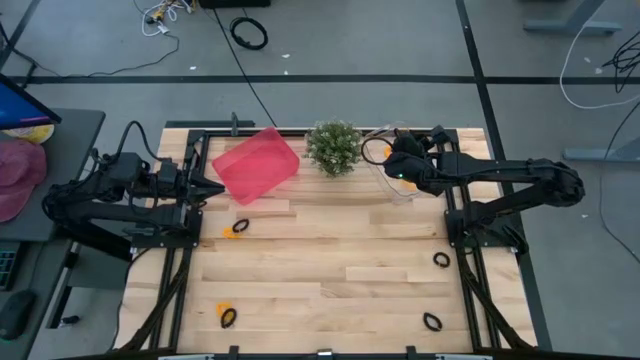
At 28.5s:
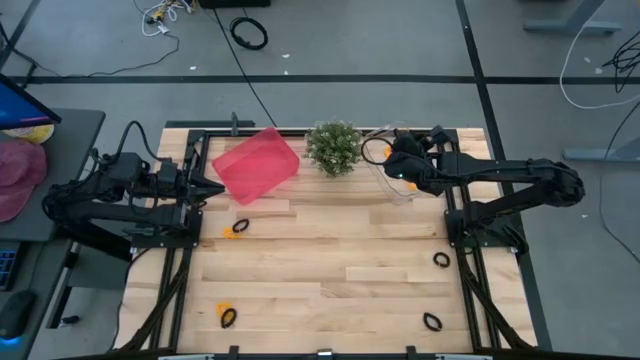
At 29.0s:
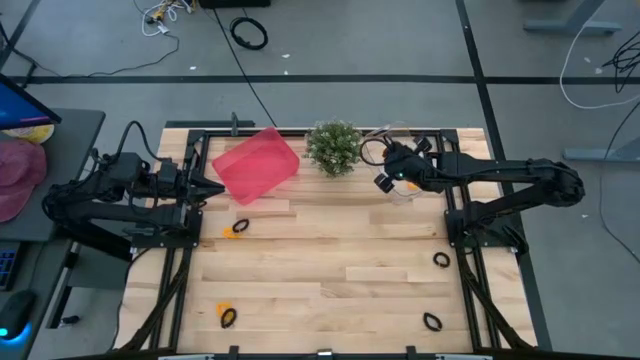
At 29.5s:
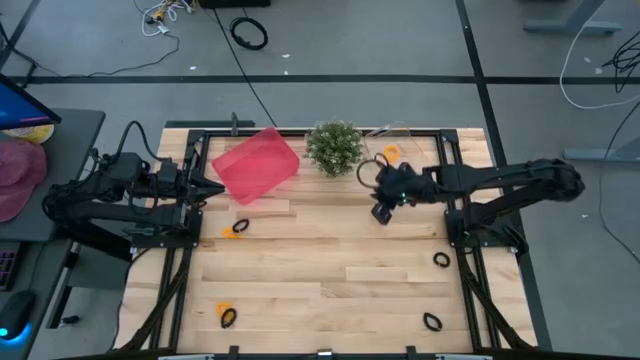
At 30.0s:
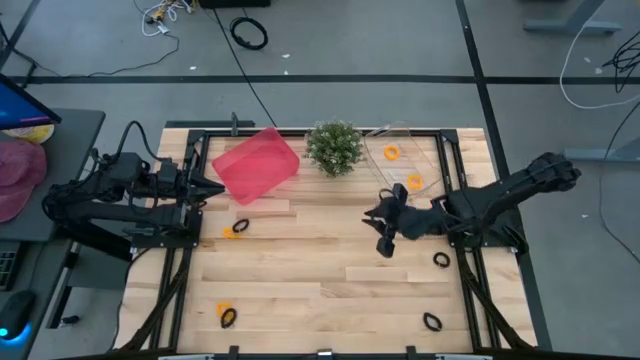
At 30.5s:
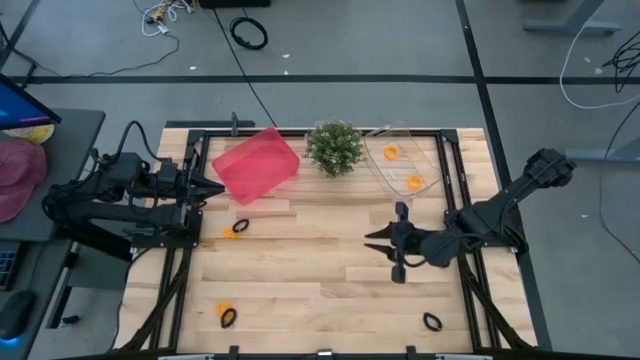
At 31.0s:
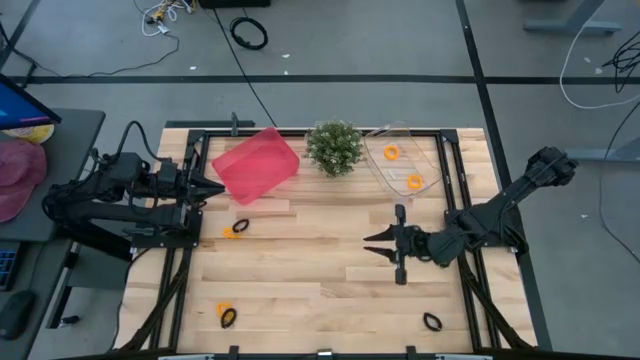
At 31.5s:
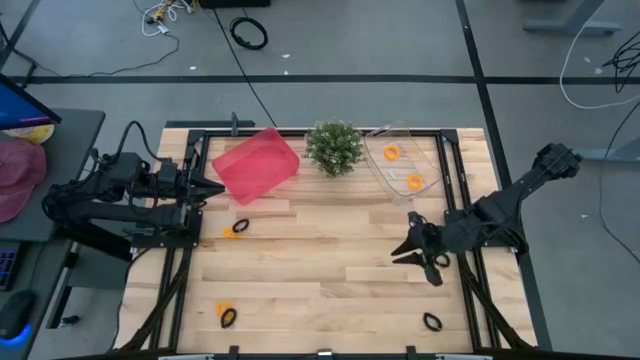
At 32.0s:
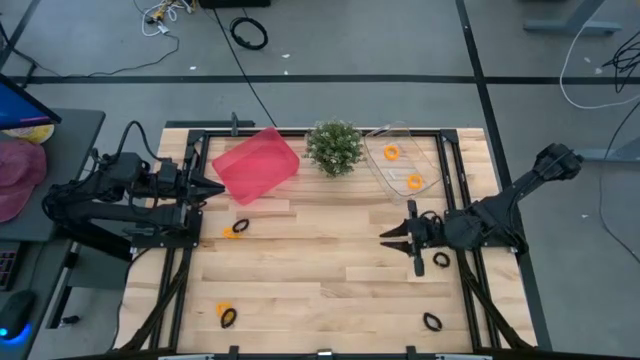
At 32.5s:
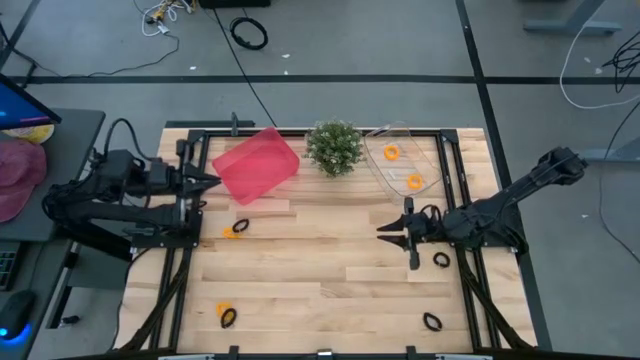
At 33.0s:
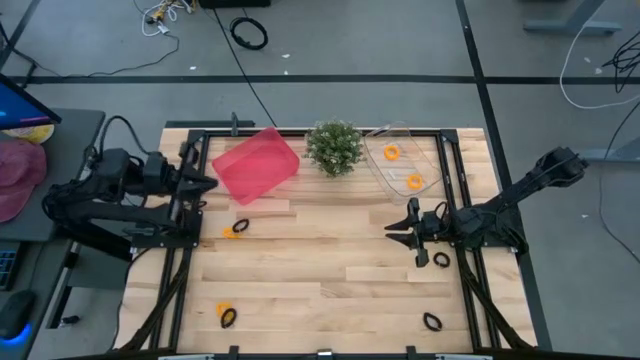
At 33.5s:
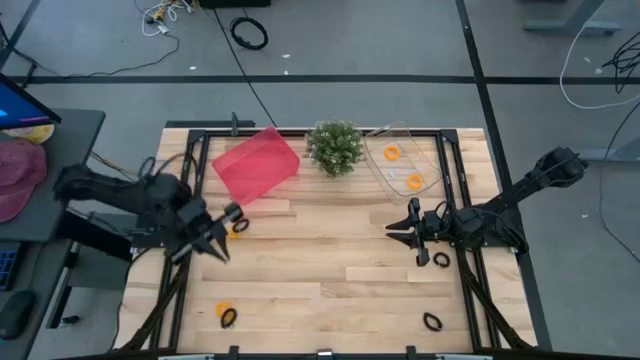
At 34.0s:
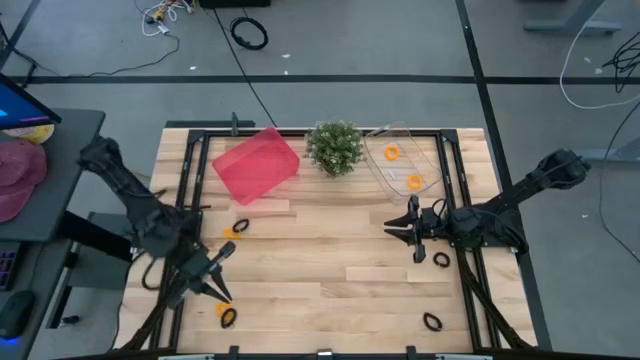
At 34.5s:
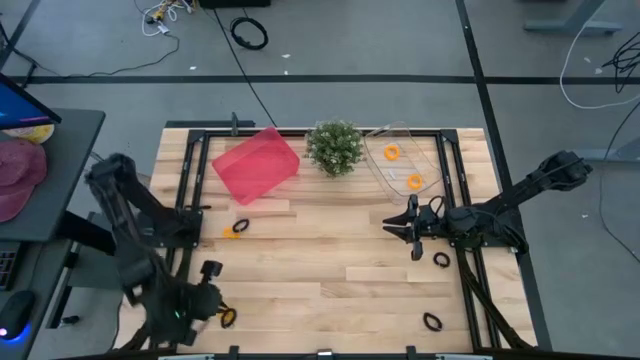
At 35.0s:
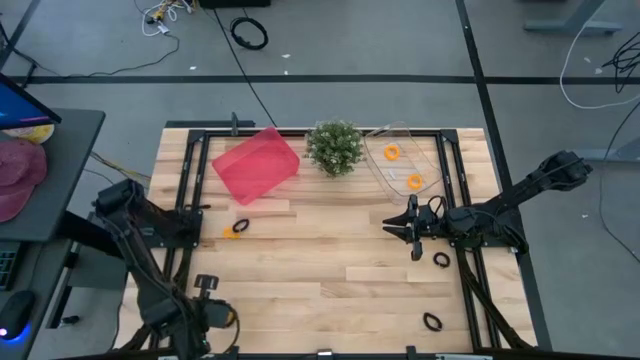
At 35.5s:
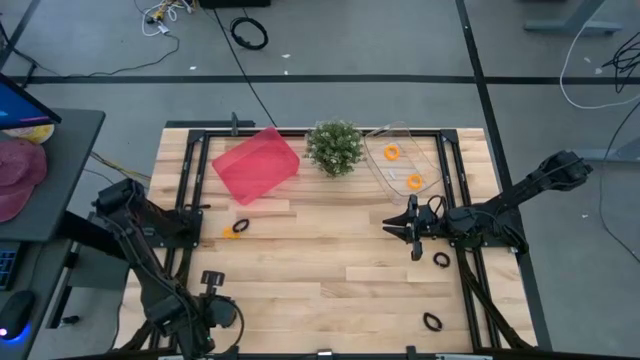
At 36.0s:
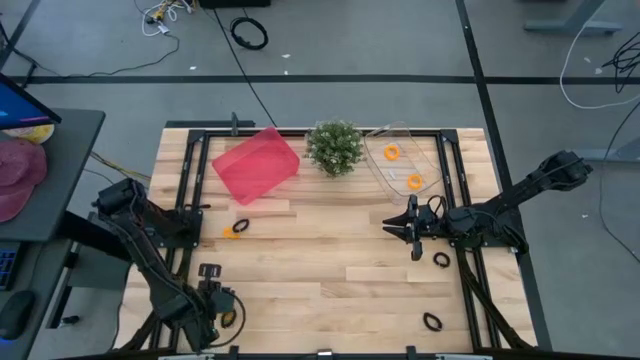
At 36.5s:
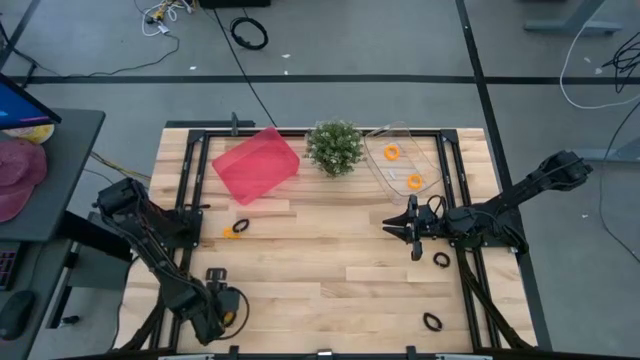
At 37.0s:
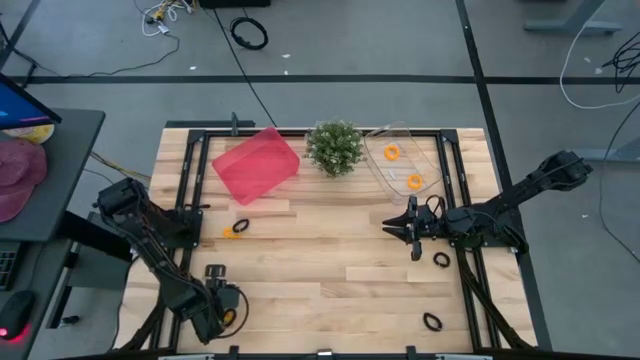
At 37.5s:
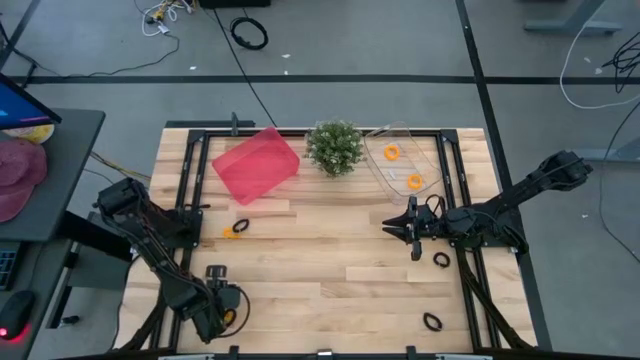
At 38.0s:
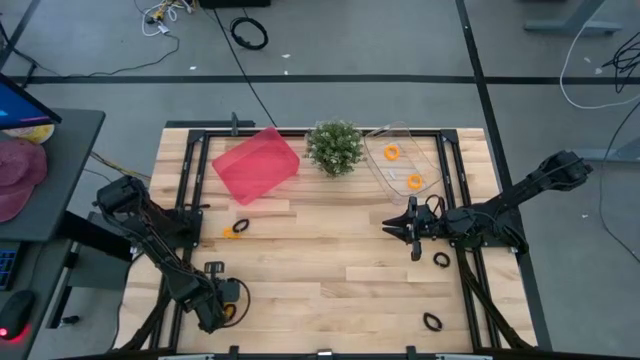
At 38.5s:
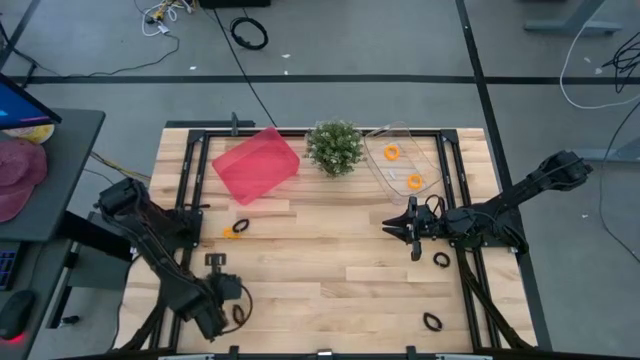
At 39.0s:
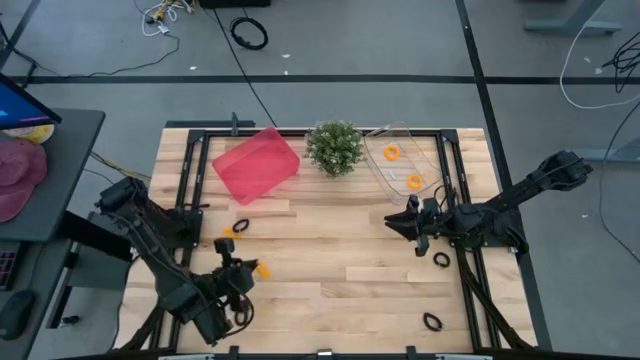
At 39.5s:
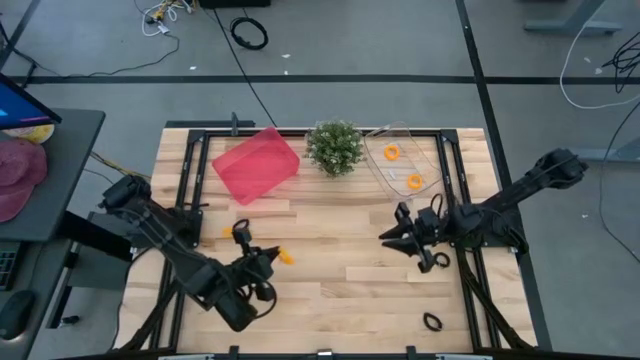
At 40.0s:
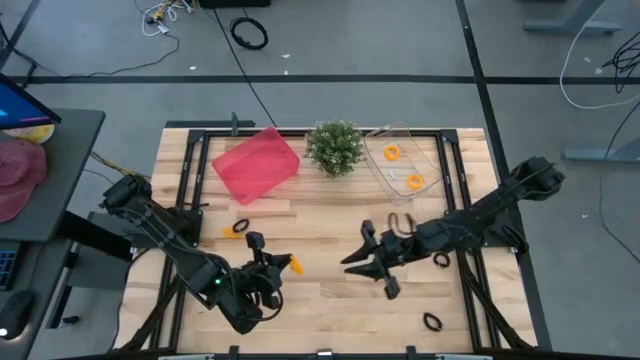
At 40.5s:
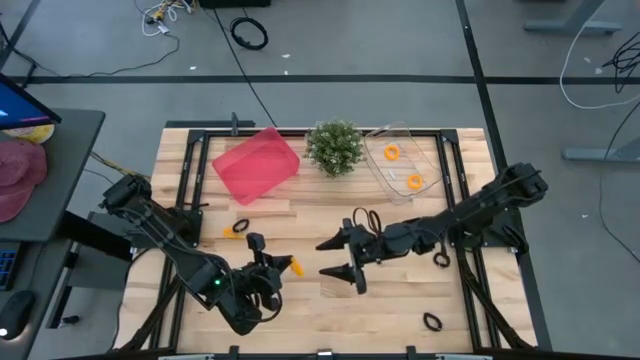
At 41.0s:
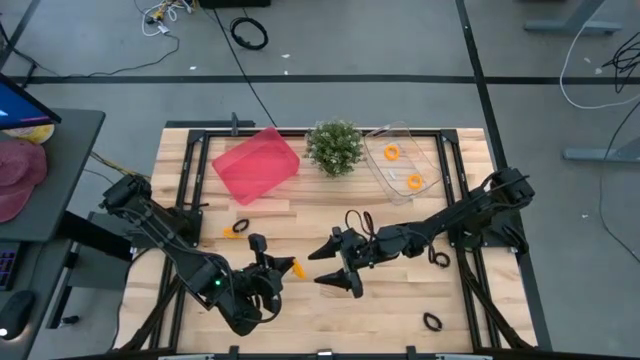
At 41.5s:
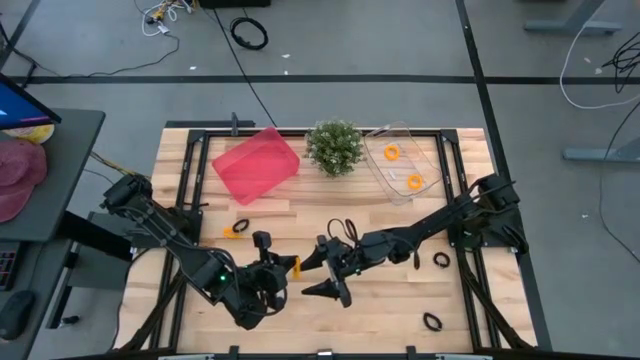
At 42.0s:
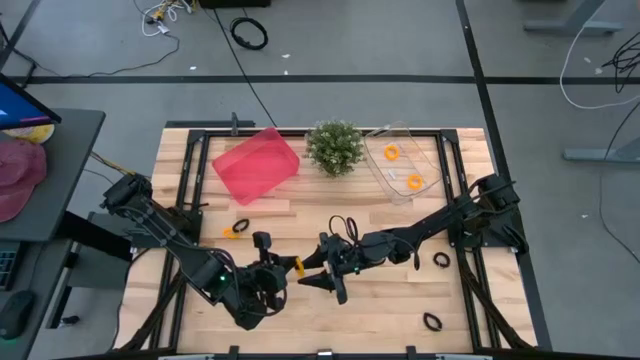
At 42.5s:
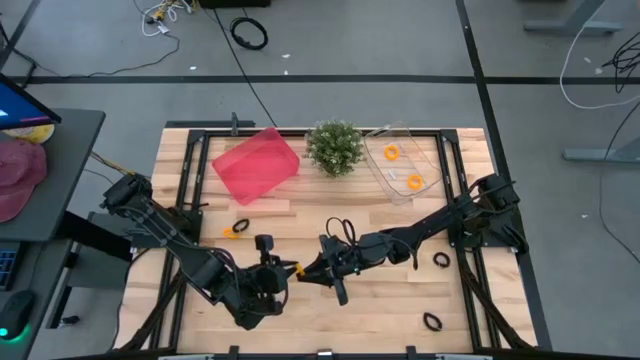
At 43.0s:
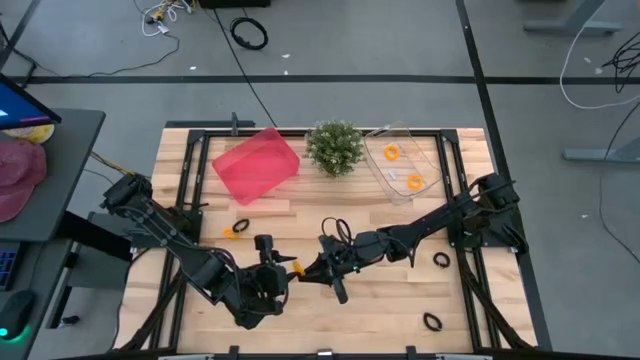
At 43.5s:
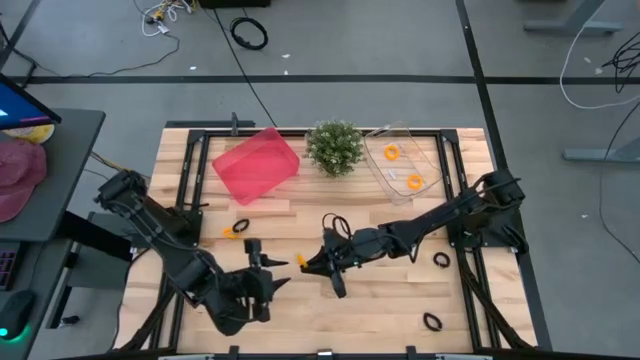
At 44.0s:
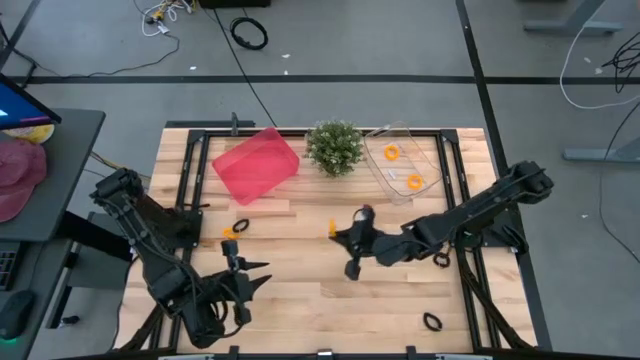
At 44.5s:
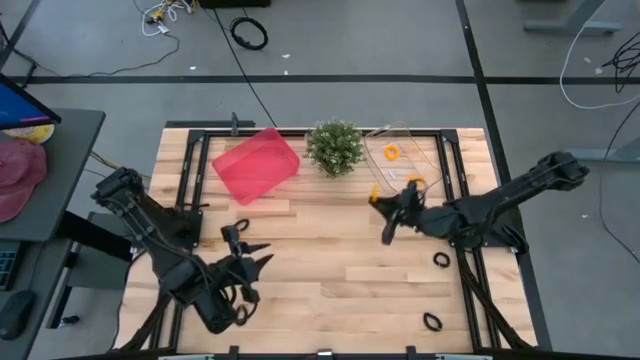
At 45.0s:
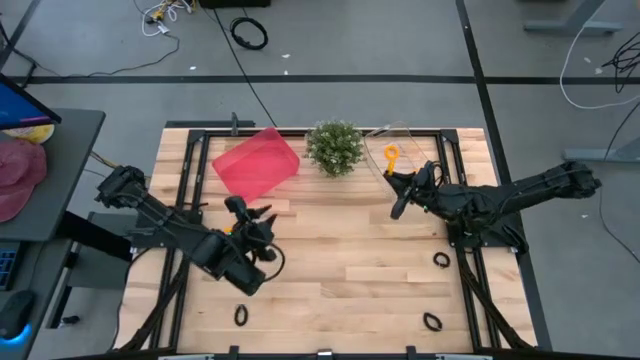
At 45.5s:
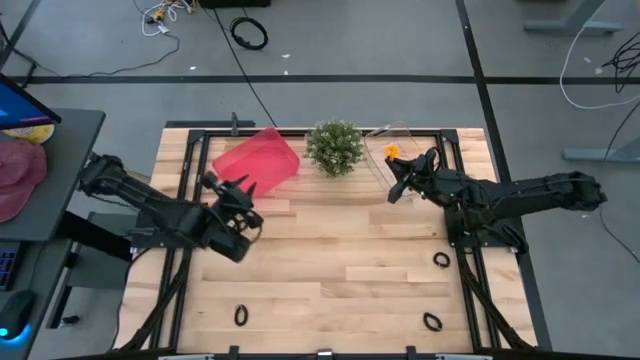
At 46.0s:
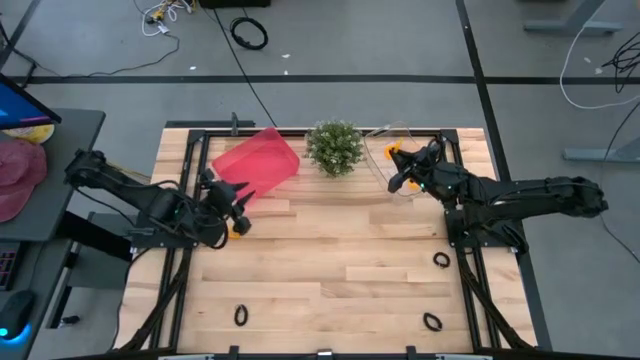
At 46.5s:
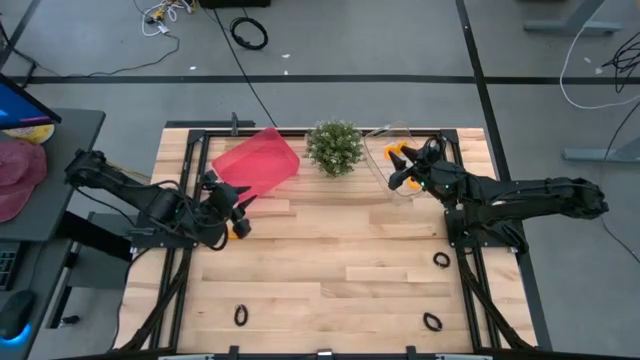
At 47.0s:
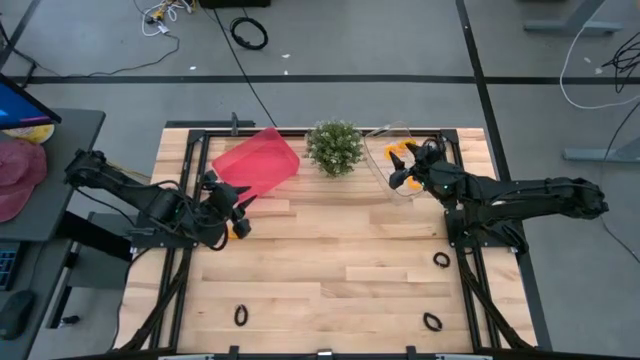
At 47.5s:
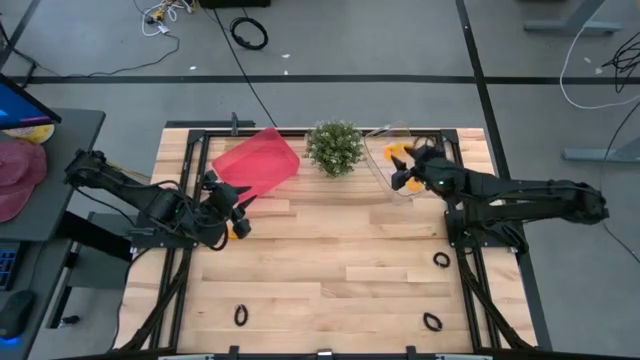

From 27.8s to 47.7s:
Task: Sort spring keychains
Put the yellow spring keychain into the transparent bin
